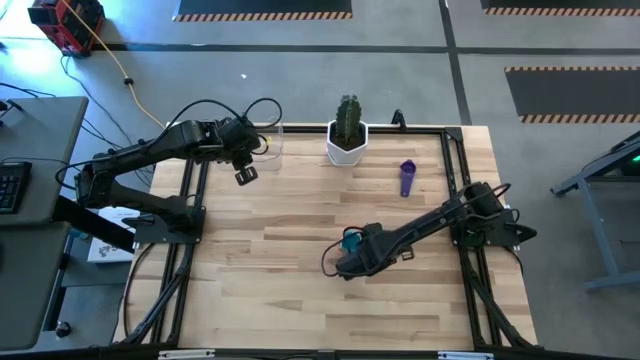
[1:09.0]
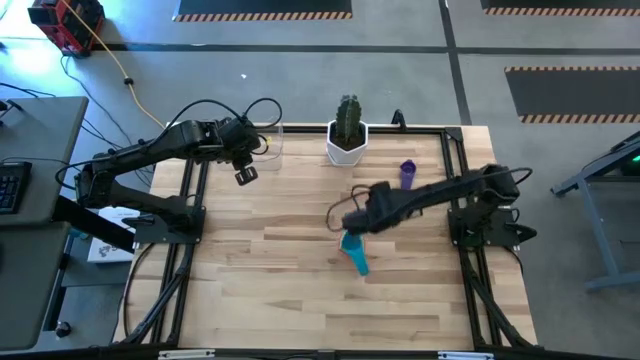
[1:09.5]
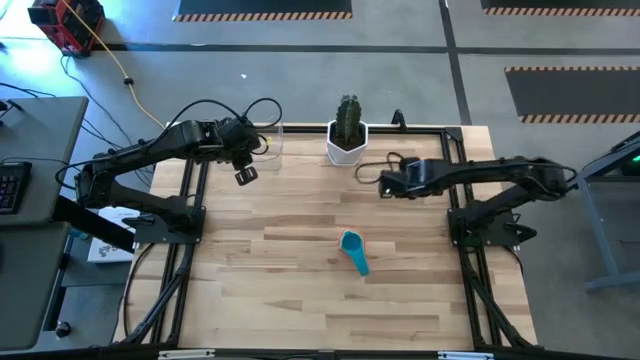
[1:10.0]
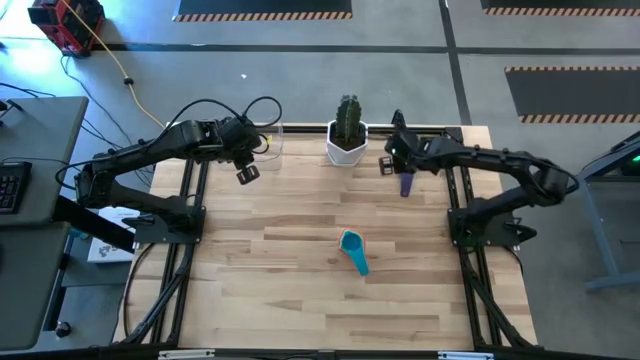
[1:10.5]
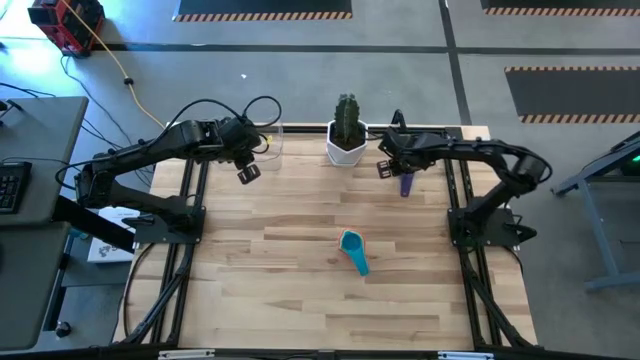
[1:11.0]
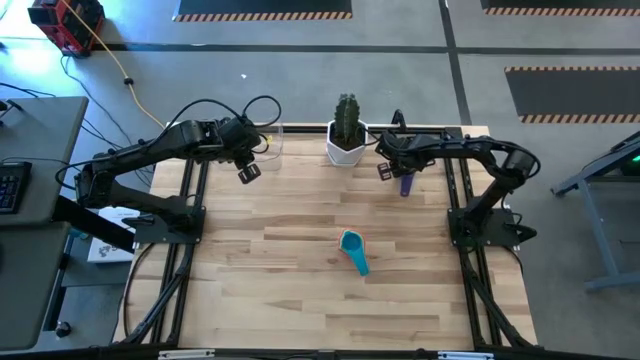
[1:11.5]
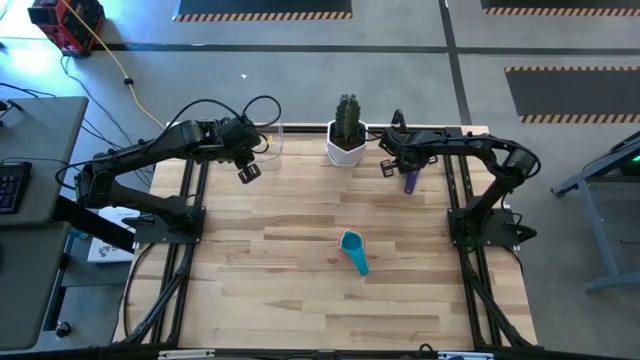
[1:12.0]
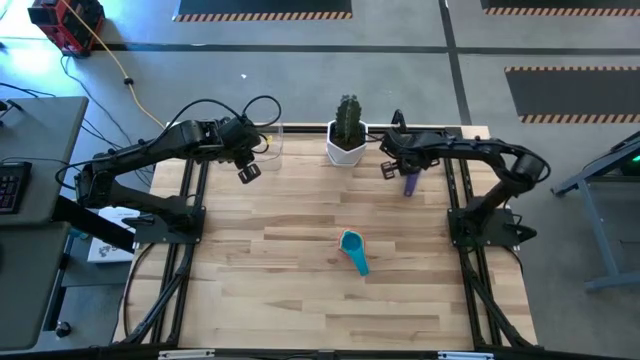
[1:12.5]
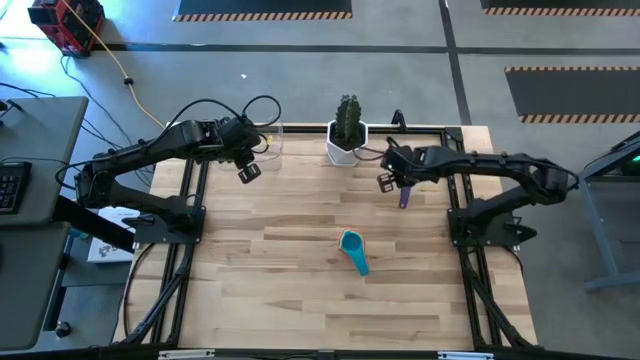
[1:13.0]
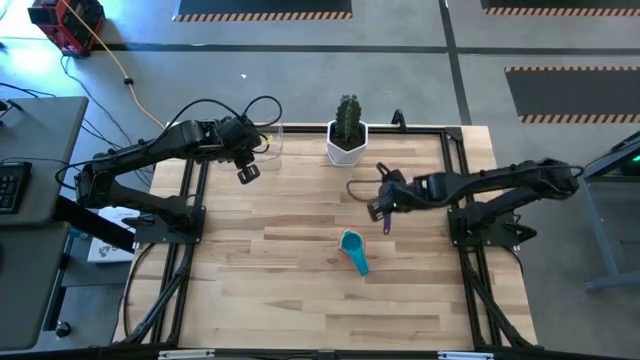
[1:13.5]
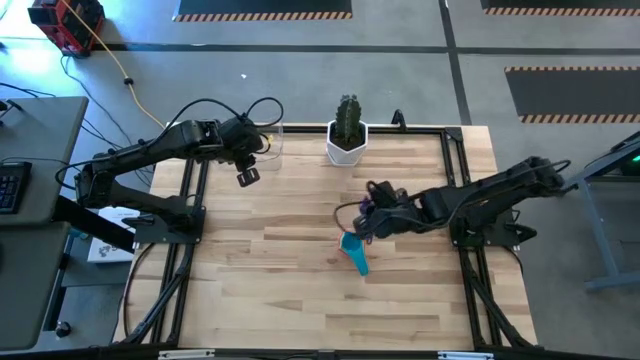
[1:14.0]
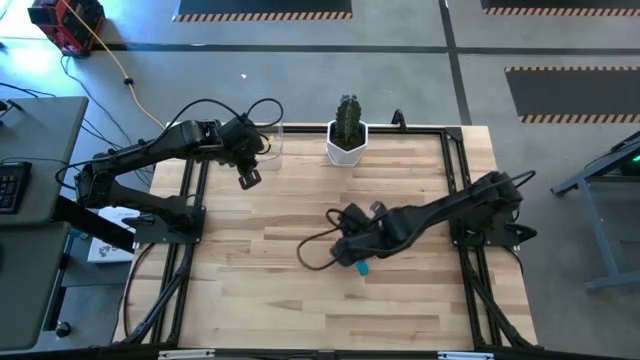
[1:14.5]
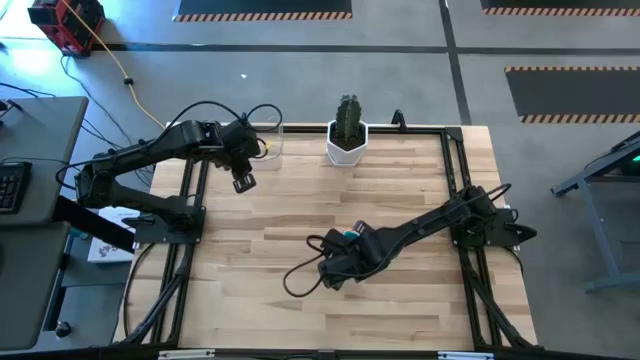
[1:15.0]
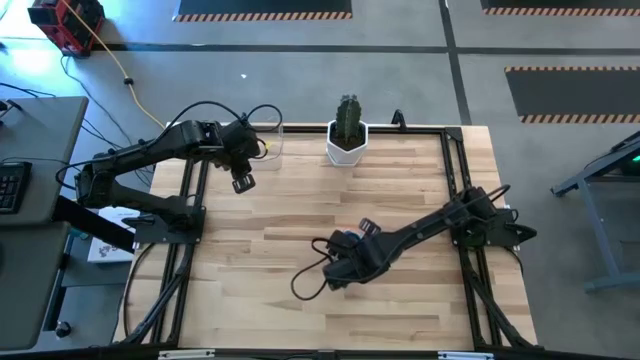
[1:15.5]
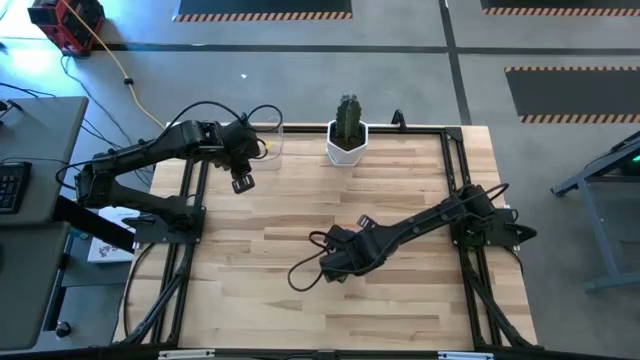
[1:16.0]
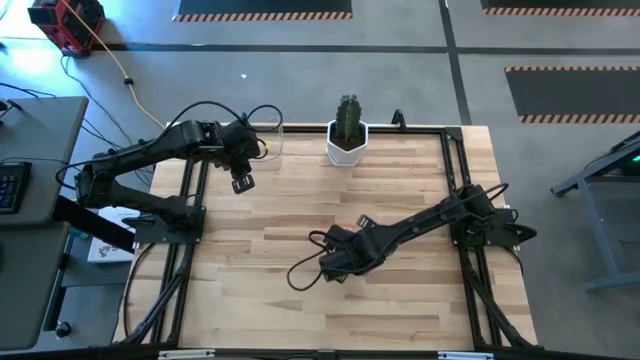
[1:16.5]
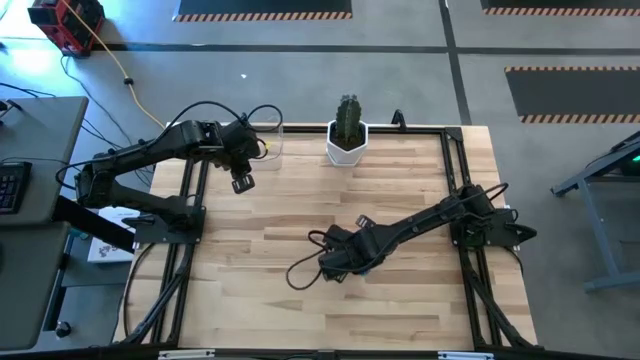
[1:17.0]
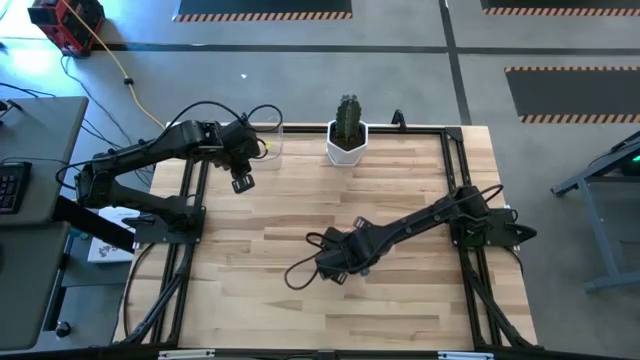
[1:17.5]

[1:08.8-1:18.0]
Task: Nest measuring cups in basket
Stack the violet measuring cup on the light blue measuring cup

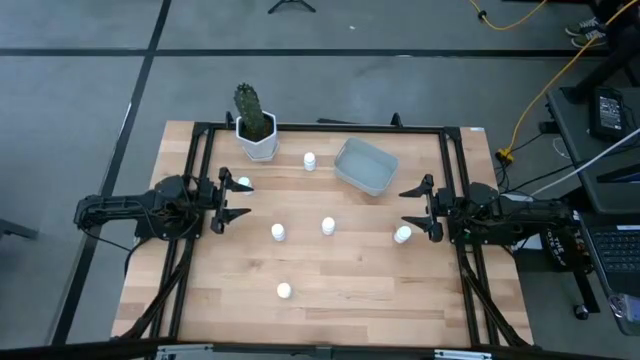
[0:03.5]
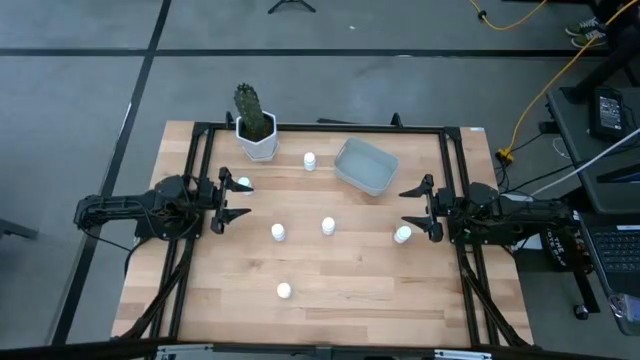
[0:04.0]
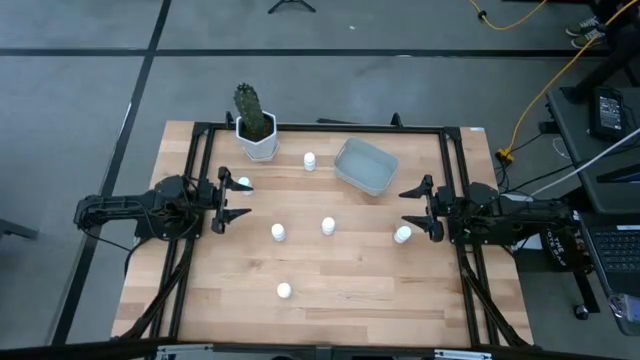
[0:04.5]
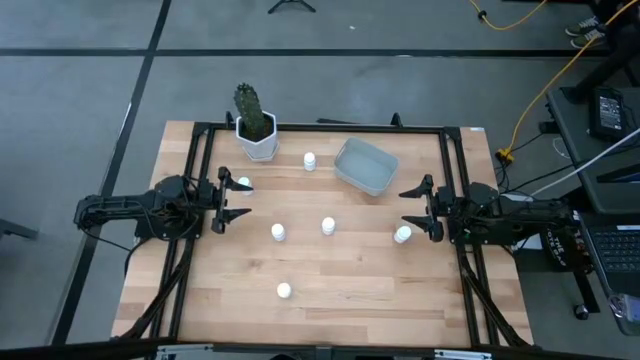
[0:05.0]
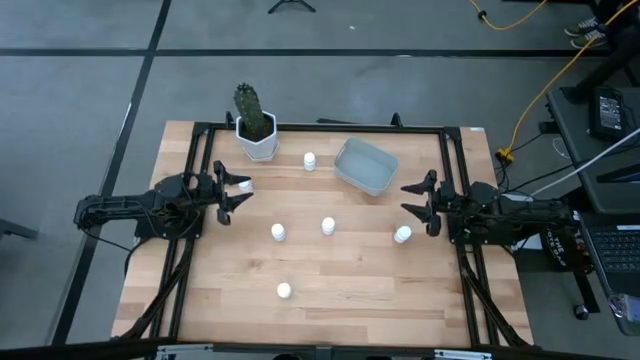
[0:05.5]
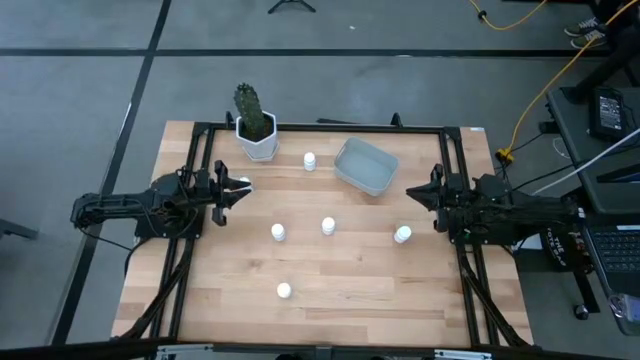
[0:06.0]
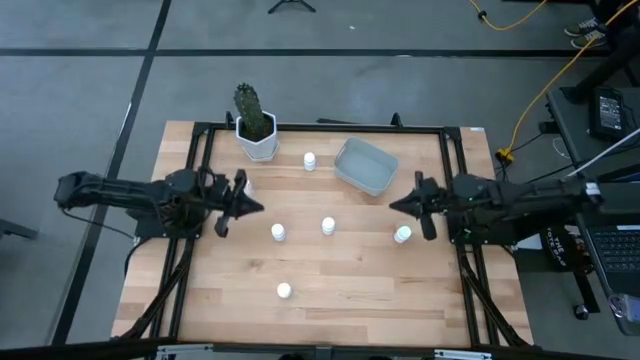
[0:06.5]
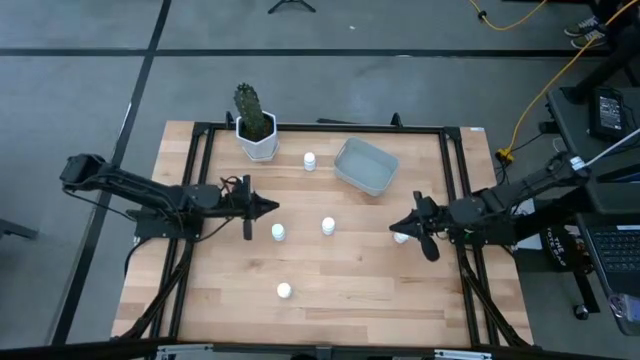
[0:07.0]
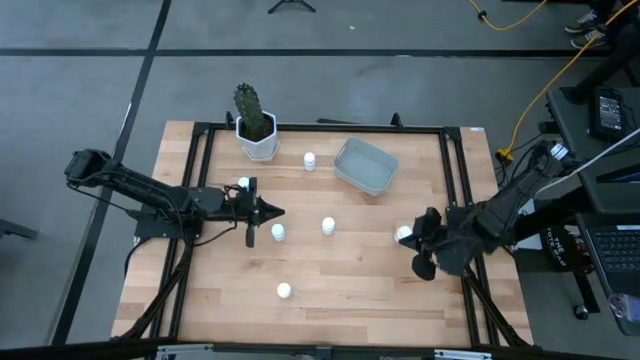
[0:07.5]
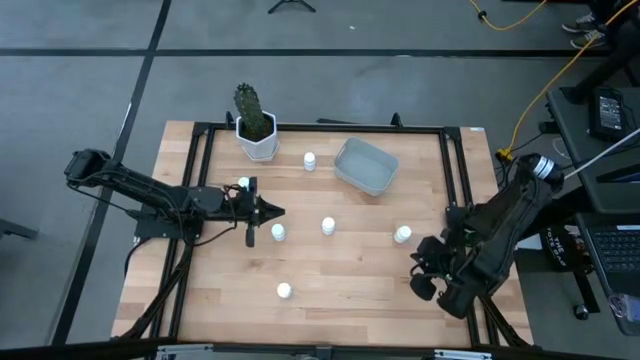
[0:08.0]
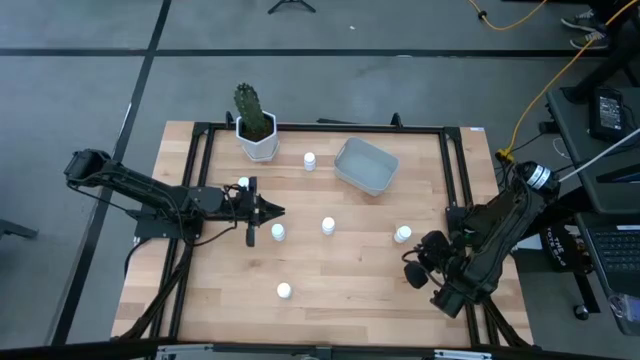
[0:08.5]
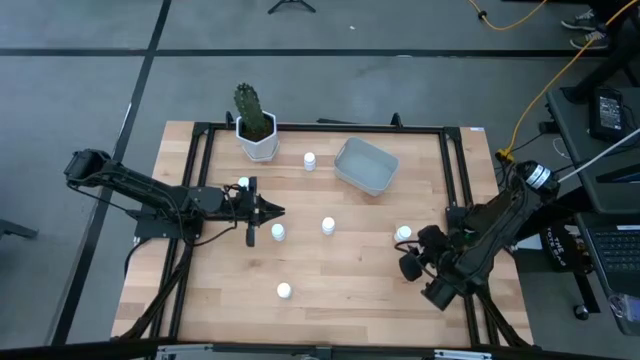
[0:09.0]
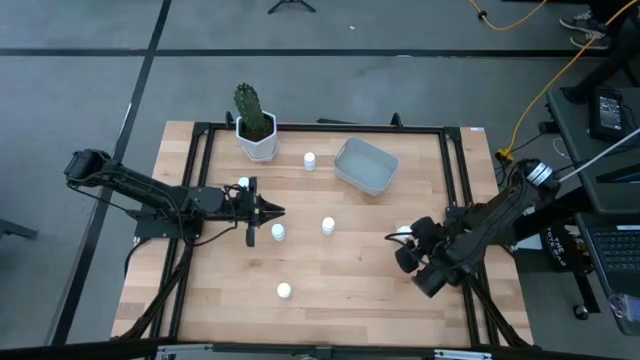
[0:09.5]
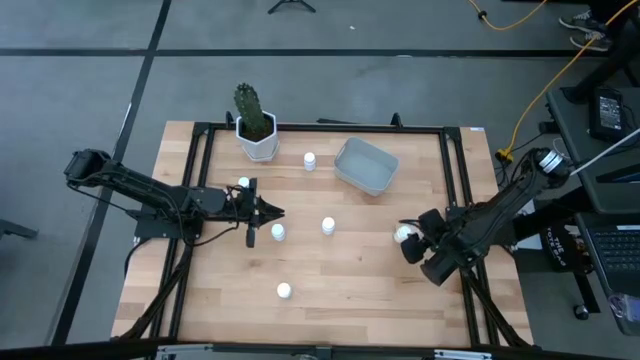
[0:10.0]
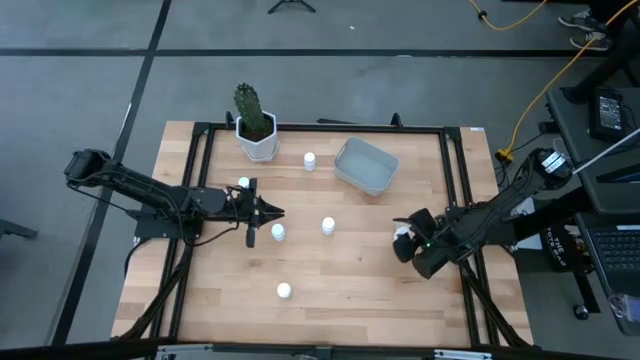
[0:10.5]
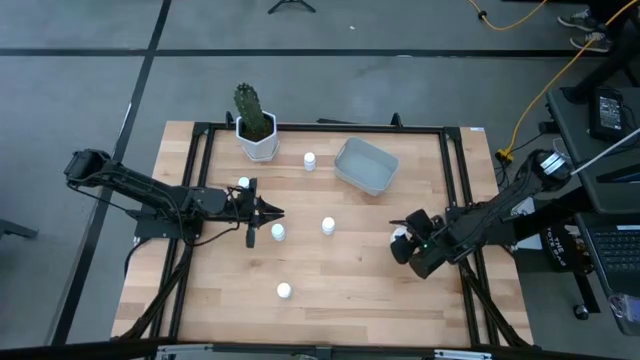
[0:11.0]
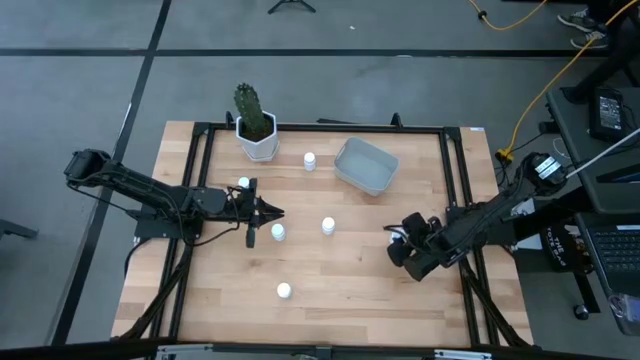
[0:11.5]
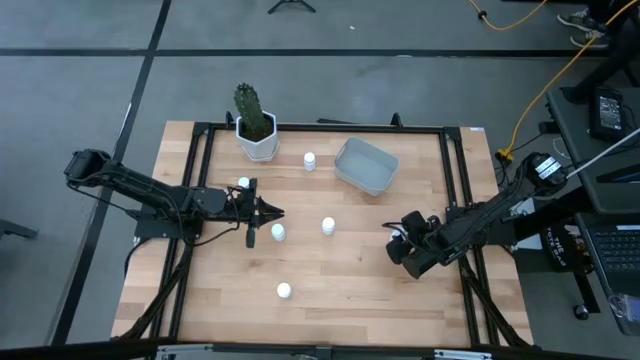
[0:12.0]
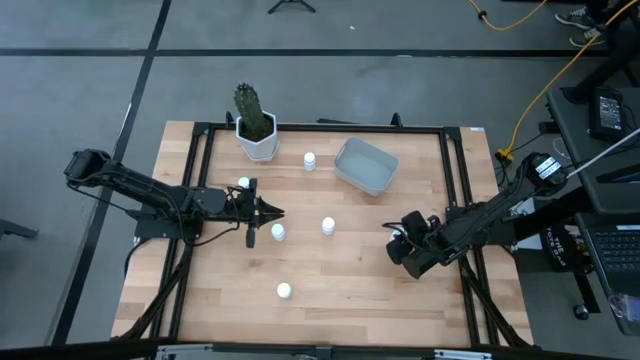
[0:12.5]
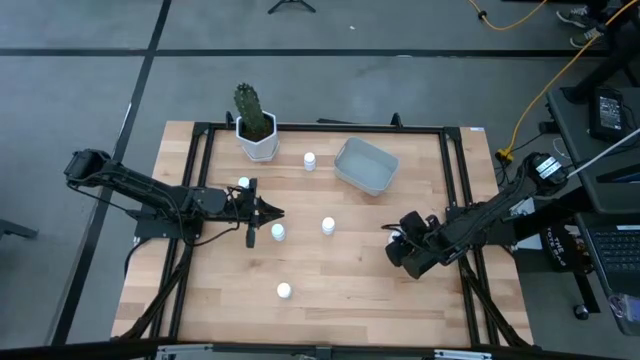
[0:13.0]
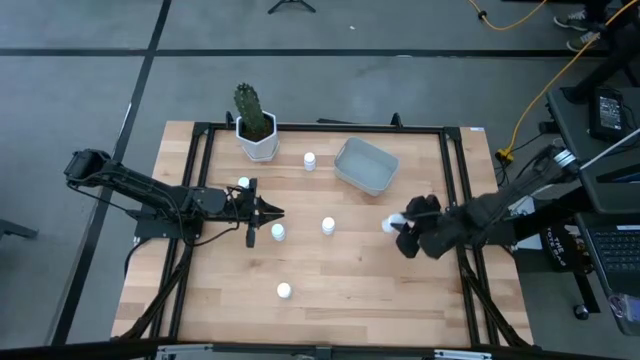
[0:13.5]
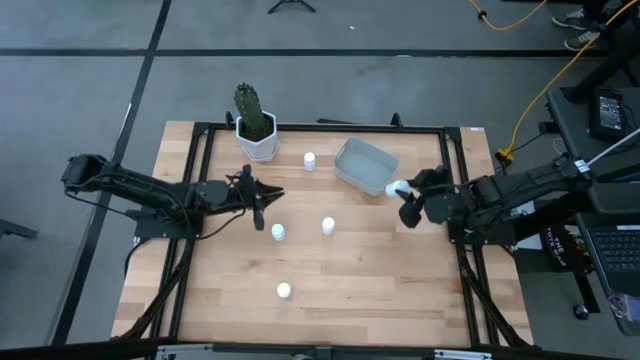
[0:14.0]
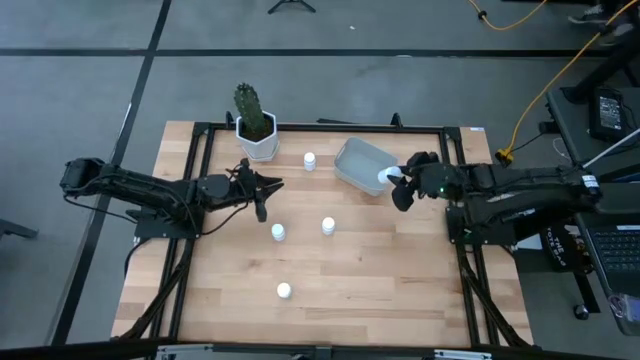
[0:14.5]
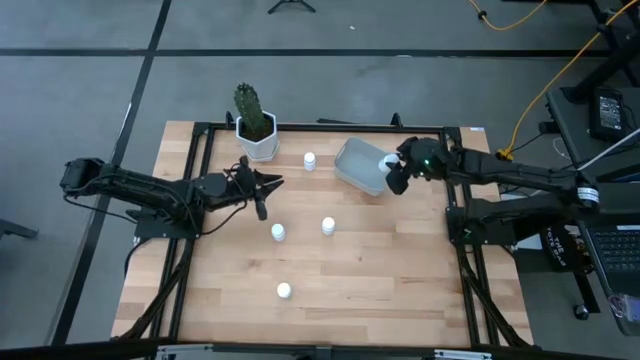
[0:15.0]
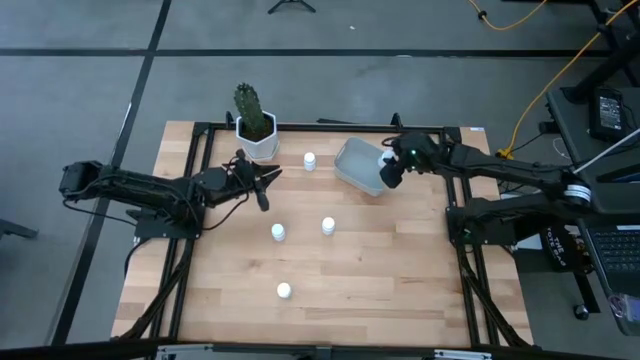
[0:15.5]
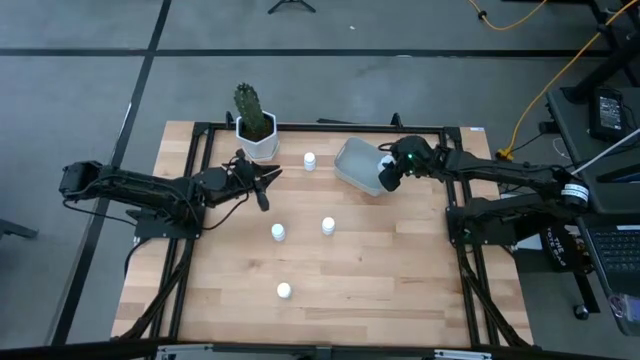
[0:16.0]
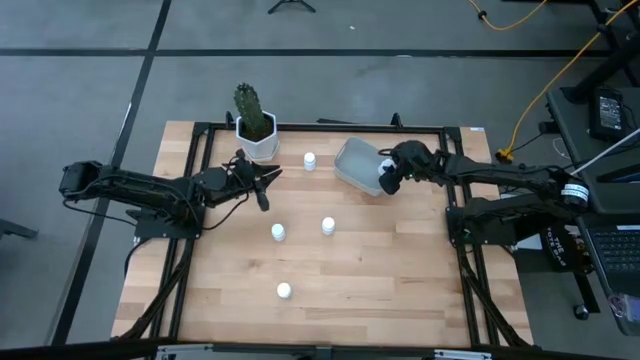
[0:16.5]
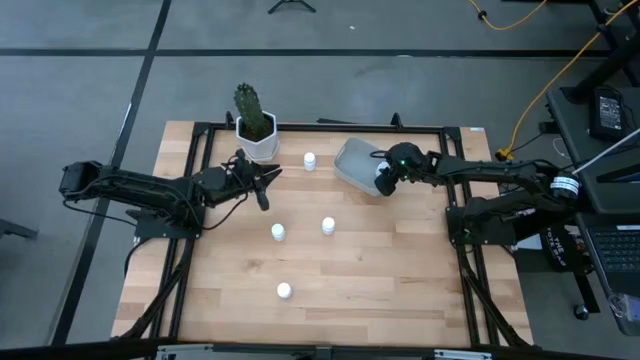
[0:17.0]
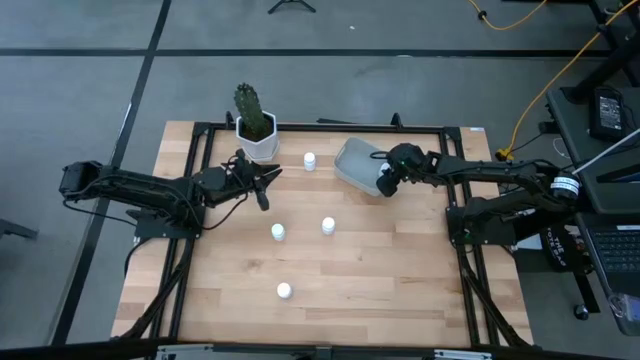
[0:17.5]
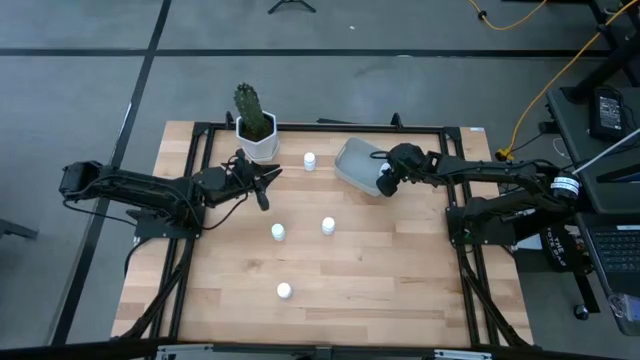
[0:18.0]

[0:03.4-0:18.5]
Task: Pick and place pill bottles into a basket
Put the white pill bottle into the gray bin
